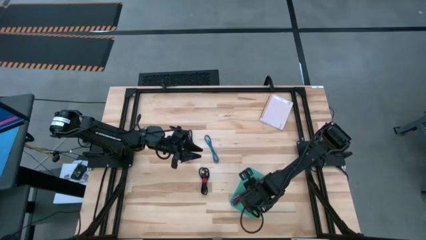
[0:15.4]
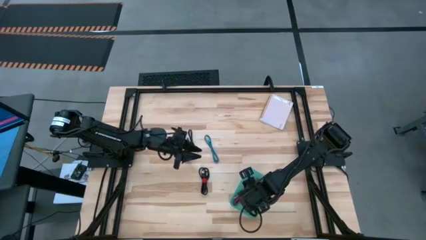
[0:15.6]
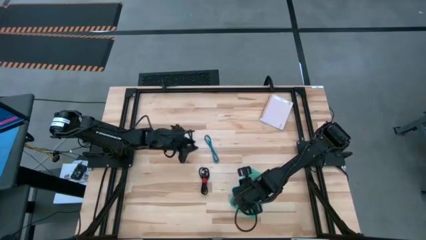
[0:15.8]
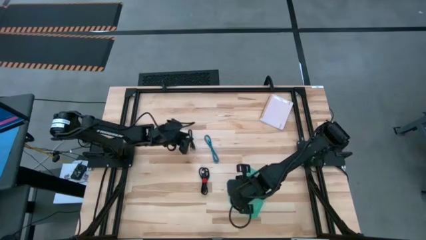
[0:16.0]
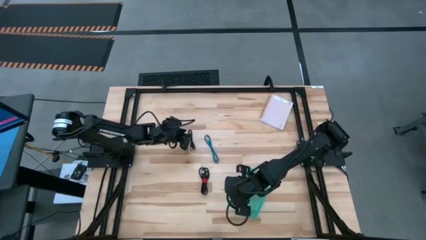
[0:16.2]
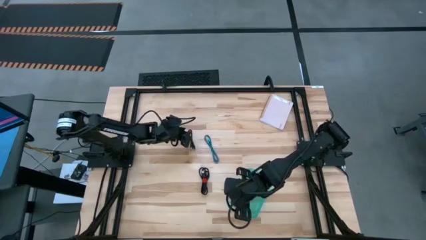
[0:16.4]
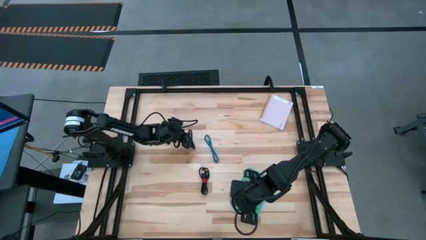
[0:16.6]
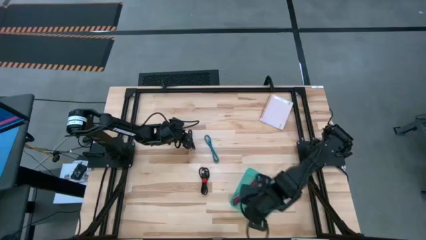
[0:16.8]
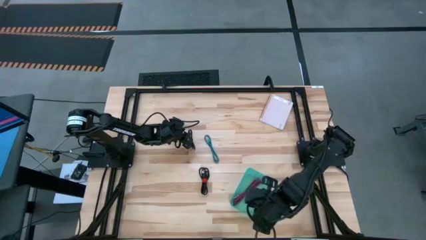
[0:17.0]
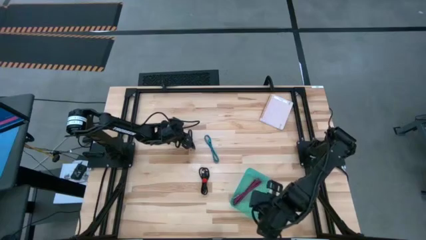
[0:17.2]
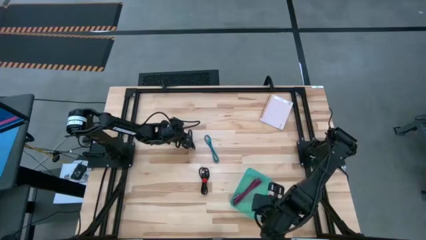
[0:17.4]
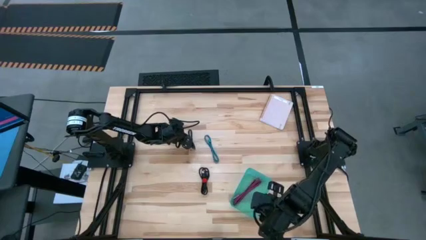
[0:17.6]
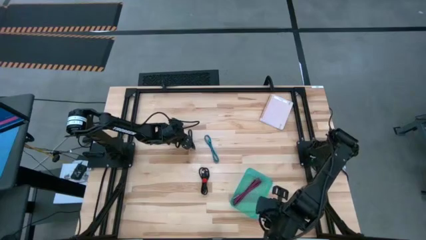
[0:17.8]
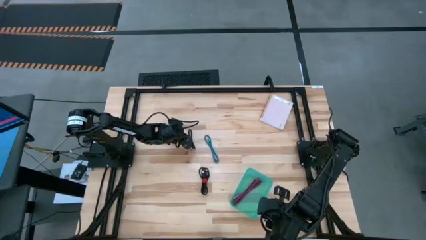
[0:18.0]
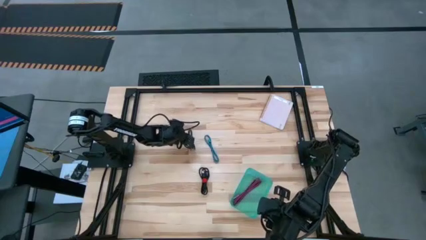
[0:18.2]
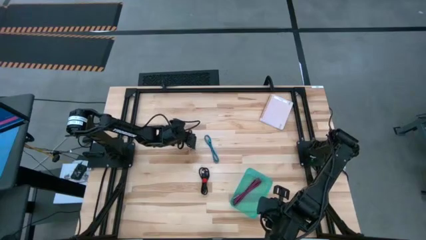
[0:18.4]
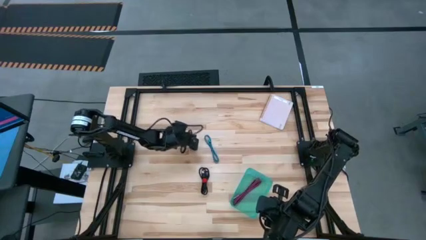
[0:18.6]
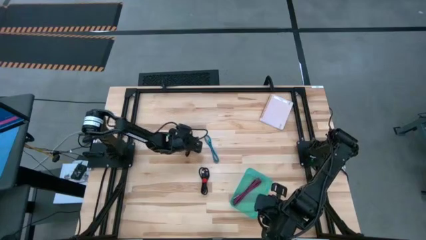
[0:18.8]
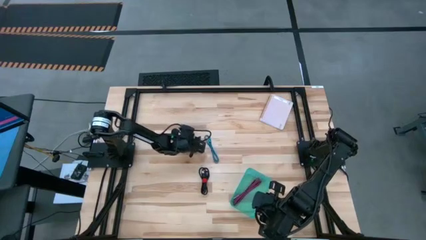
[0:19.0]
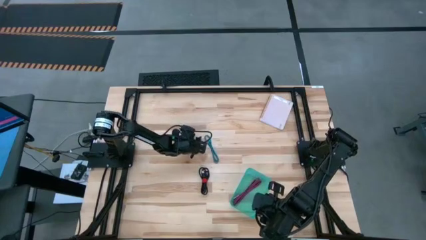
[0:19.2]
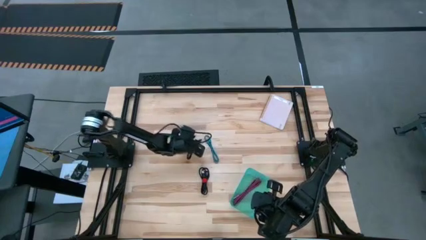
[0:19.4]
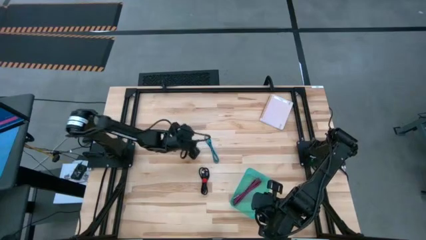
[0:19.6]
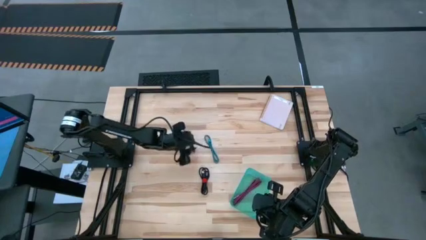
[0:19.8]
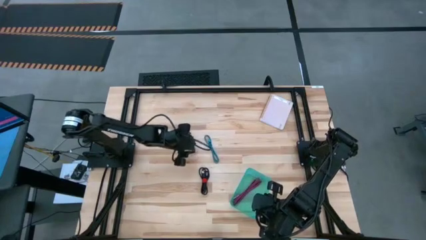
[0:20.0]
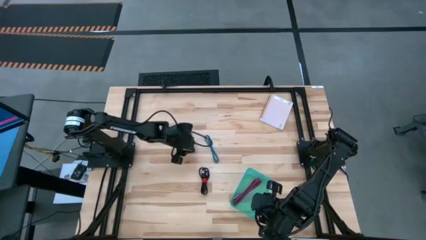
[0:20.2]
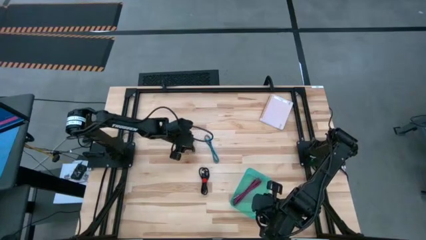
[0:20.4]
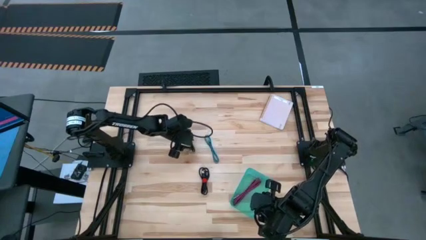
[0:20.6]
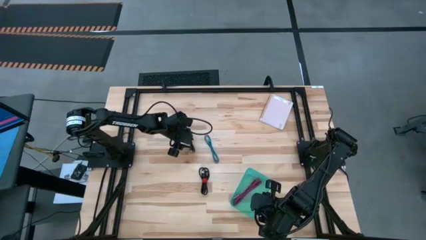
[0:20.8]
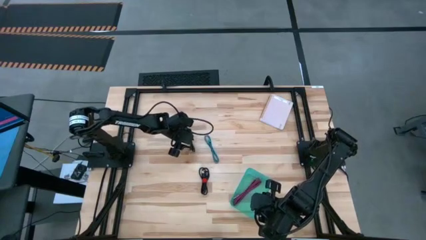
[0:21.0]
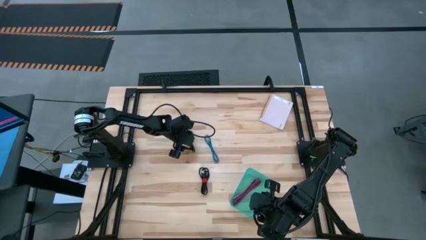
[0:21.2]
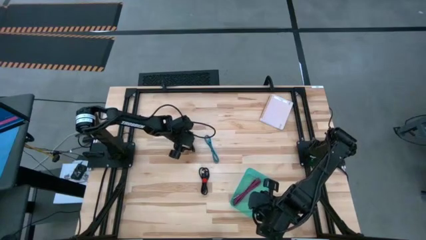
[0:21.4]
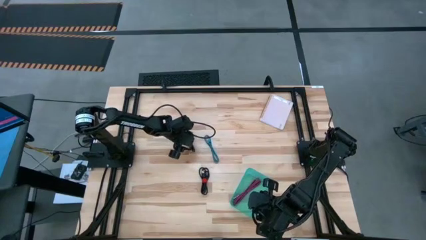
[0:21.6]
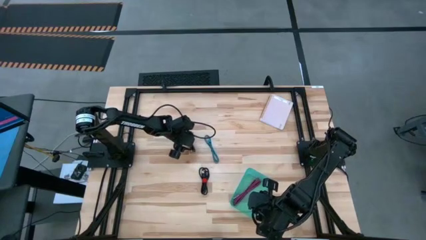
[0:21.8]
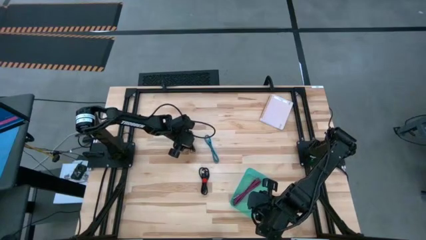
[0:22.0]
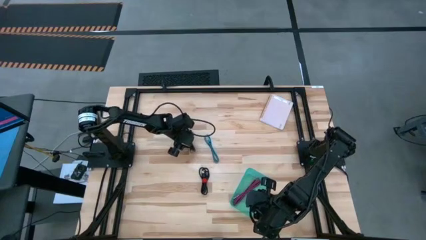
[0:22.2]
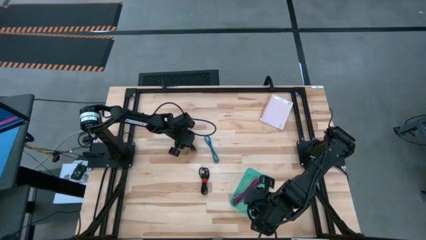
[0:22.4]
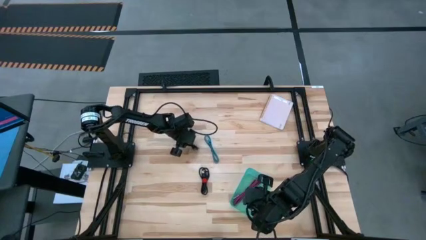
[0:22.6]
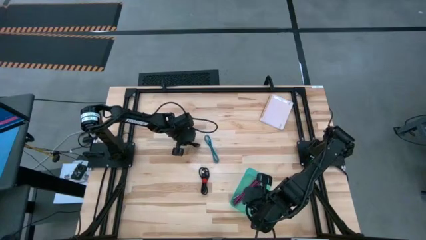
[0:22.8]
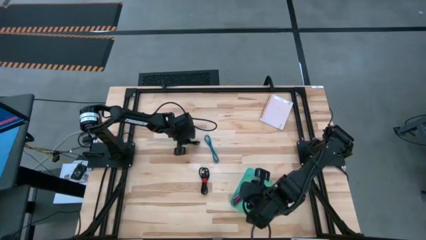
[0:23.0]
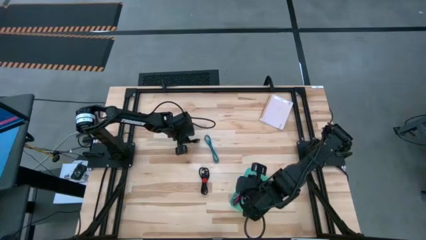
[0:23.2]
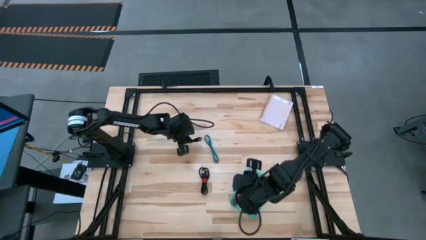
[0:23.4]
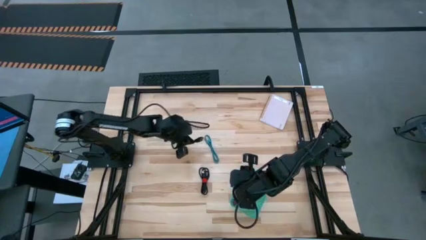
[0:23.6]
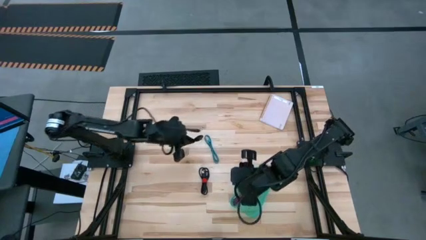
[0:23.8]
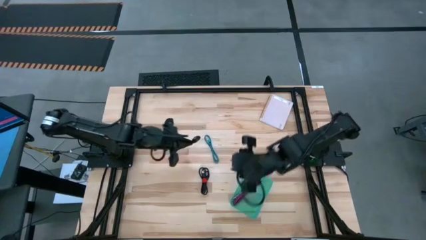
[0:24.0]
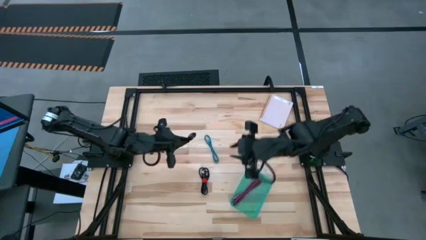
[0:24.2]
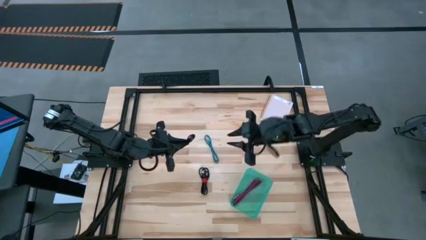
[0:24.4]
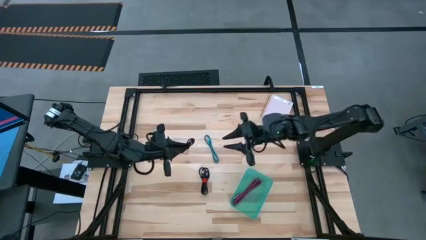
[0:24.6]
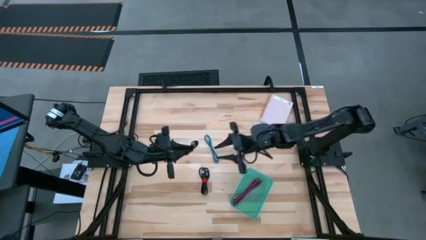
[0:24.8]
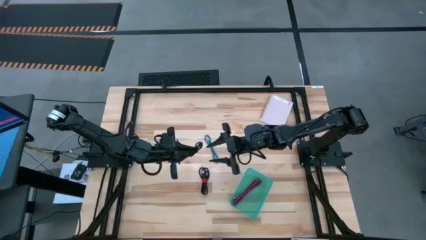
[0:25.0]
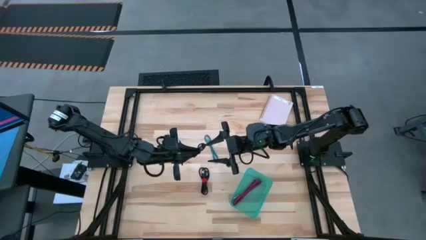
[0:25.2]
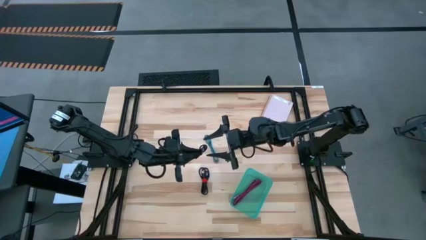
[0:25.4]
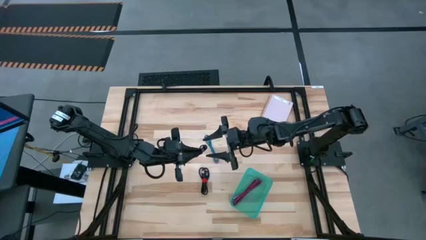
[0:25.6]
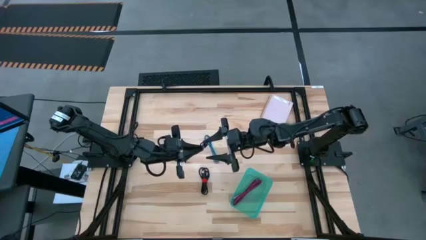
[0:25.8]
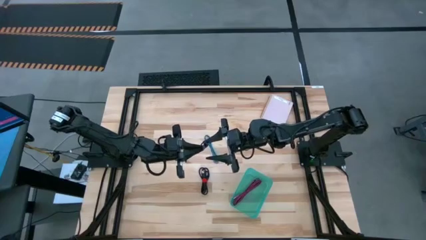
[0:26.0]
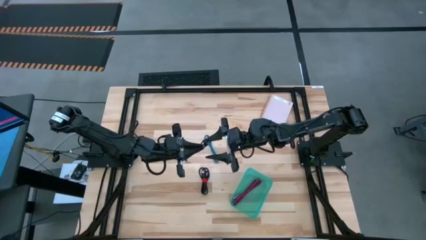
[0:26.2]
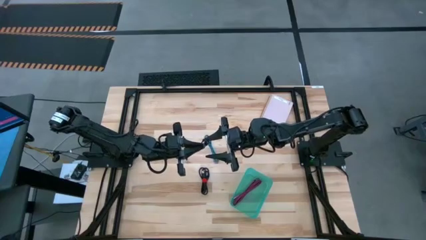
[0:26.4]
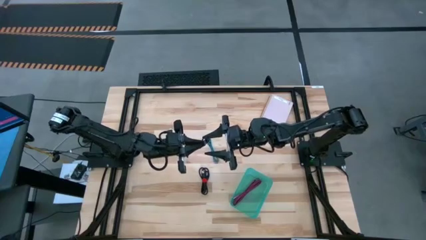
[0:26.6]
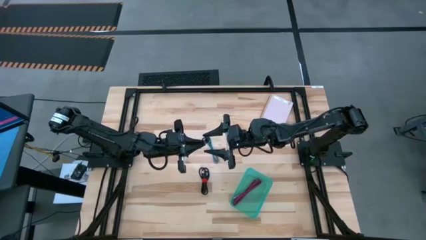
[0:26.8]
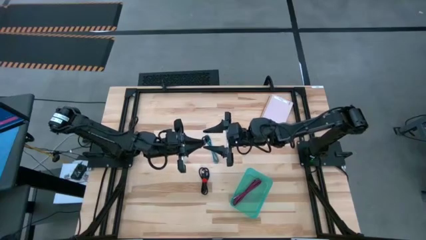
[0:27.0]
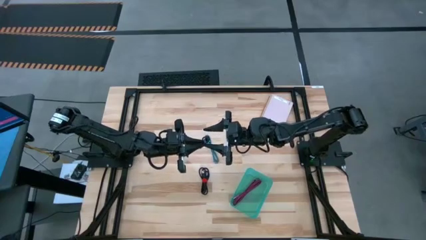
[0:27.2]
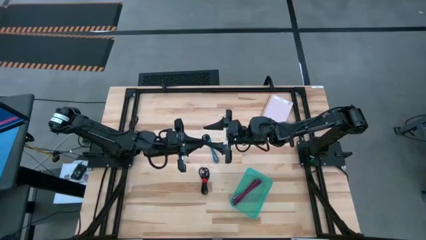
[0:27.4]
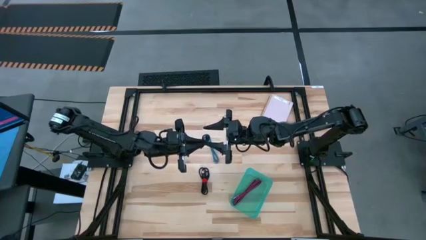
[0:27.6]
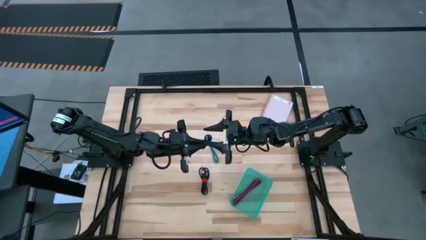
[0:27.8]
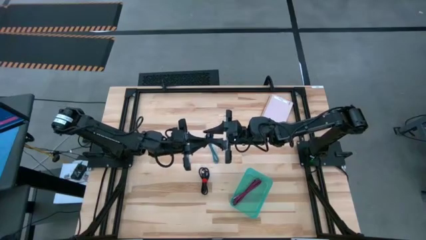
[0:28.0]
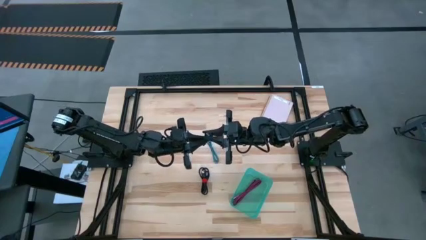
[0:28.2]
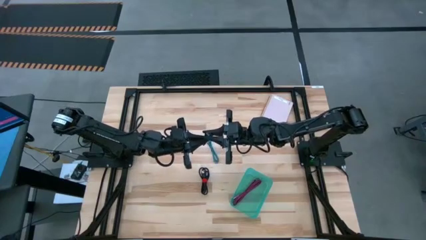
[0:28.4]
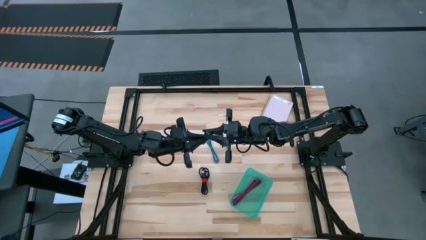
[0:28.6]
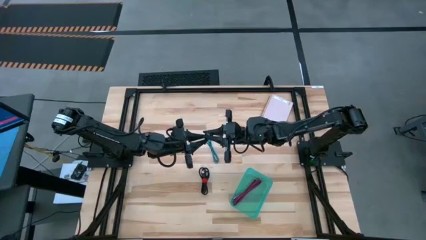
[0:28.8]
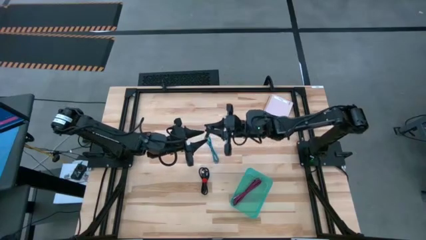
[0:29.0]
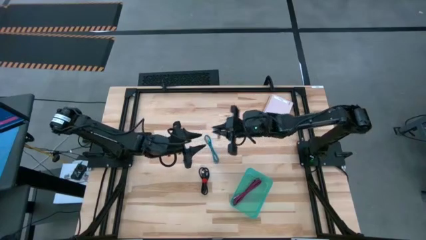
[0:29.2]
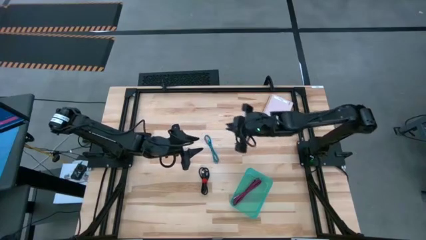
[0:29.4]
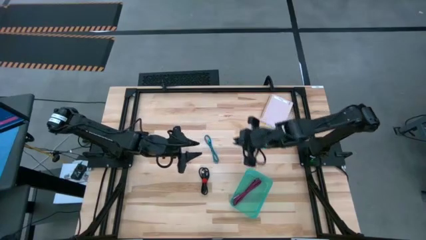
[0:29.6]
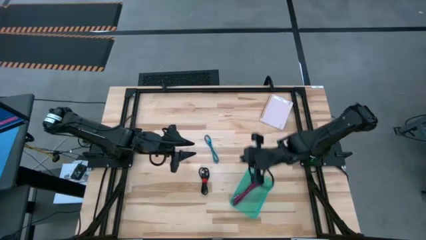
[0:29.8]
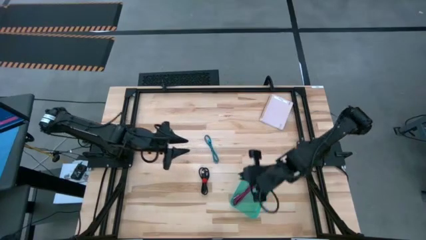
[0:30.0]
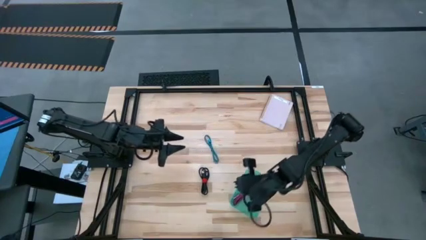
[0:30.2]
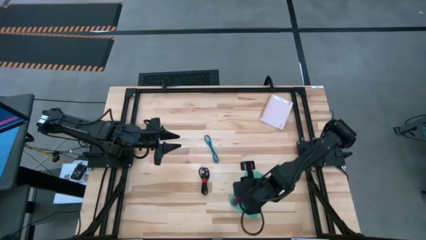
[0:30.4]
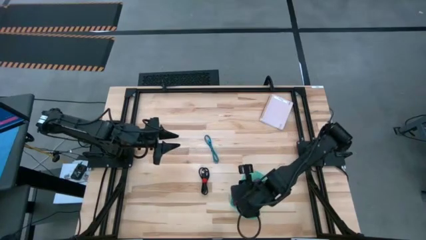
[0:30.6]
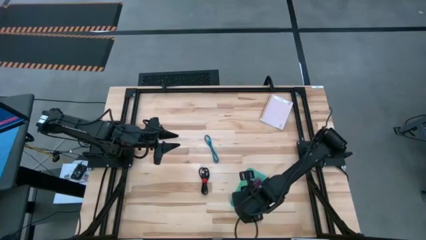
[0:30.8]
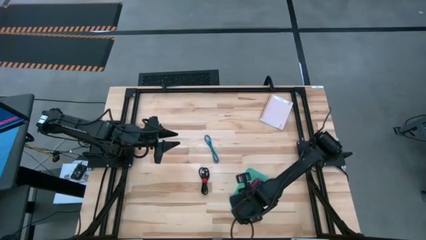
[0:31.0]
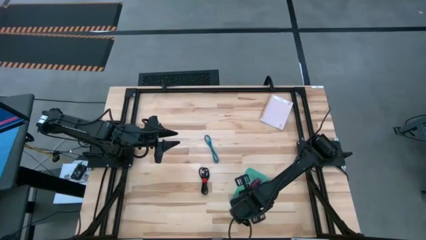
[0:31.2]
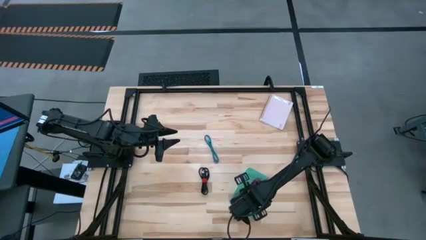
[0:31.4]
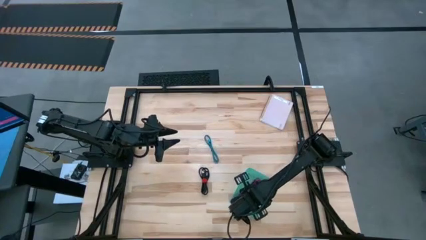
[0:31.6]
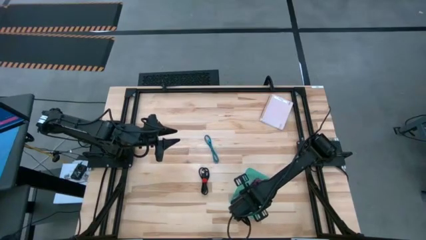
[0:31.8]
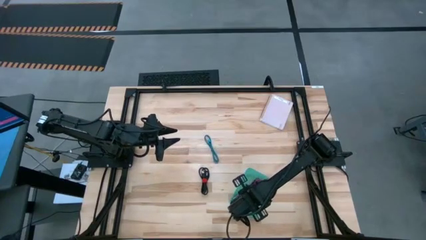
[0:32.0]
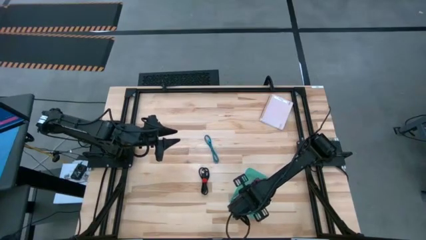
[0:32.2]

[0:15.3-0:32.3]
Task: Pick and place USB-C Cables
Put the top black usb cable into the bin
